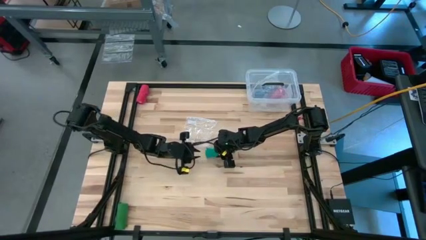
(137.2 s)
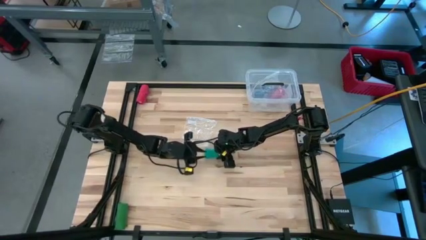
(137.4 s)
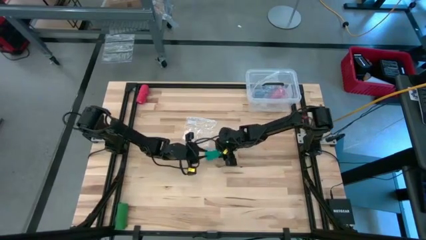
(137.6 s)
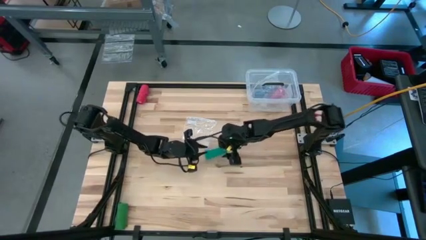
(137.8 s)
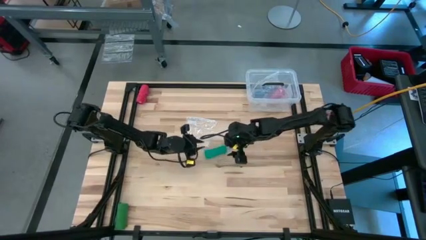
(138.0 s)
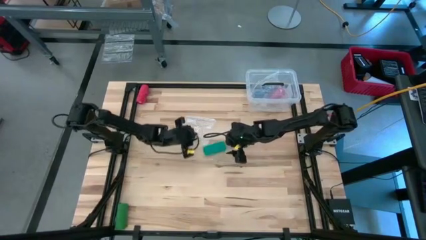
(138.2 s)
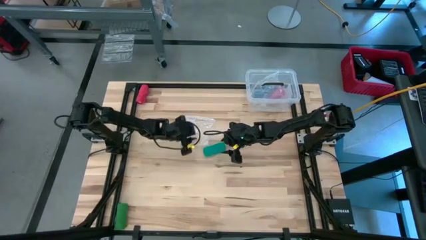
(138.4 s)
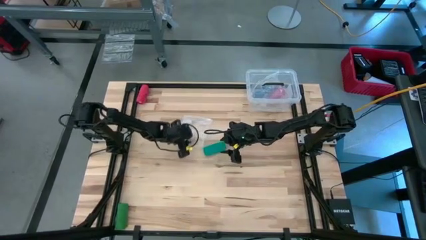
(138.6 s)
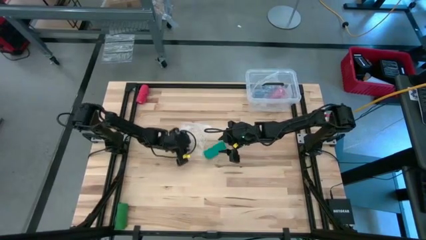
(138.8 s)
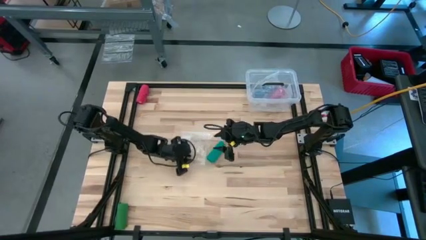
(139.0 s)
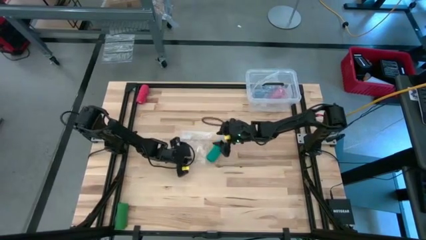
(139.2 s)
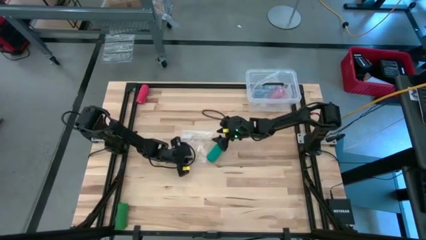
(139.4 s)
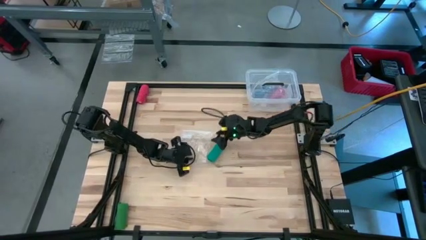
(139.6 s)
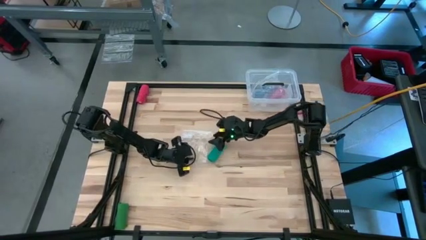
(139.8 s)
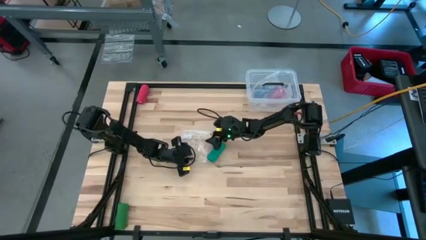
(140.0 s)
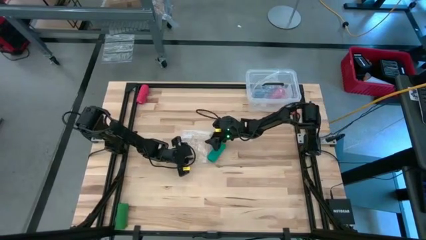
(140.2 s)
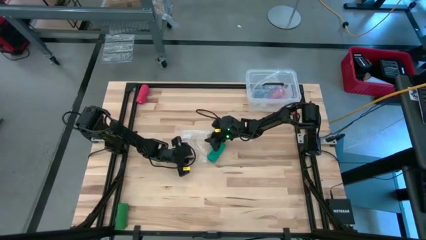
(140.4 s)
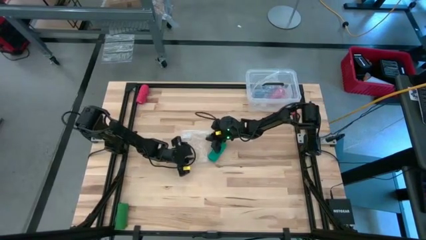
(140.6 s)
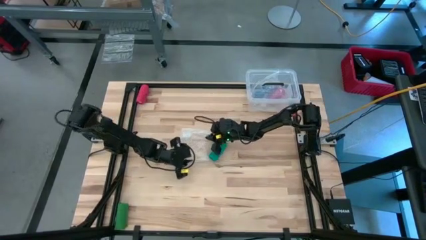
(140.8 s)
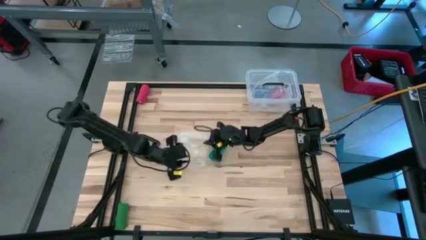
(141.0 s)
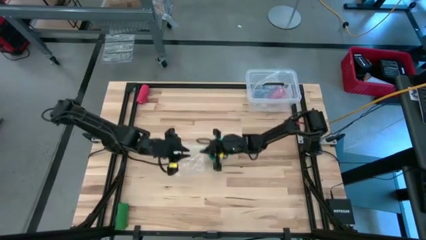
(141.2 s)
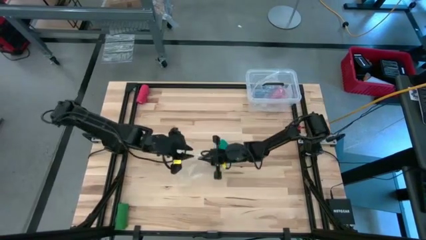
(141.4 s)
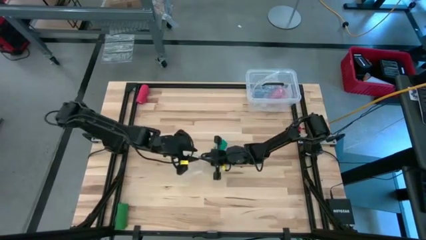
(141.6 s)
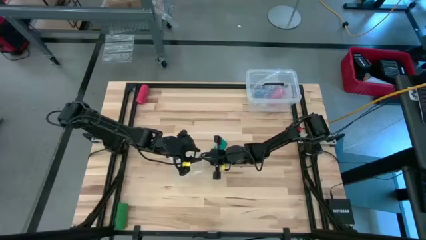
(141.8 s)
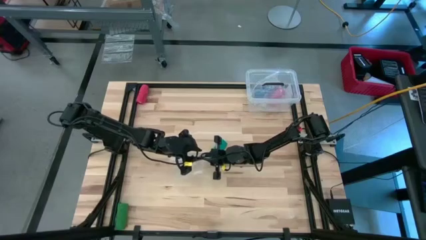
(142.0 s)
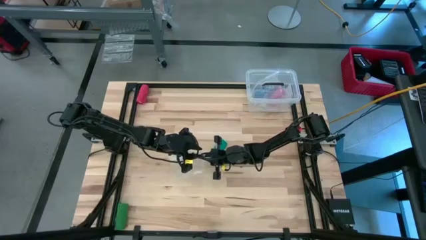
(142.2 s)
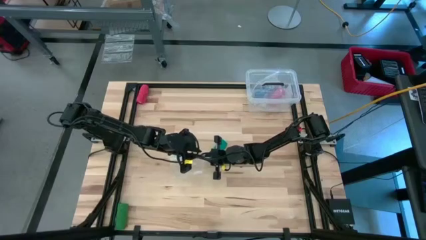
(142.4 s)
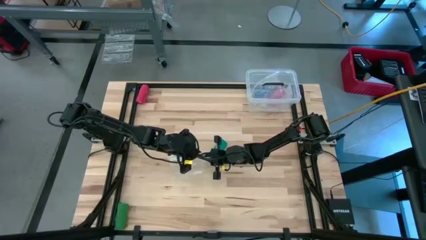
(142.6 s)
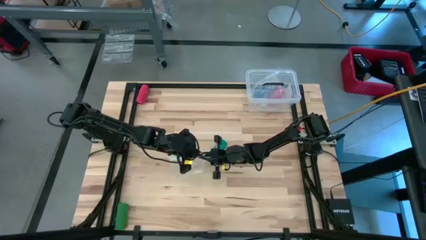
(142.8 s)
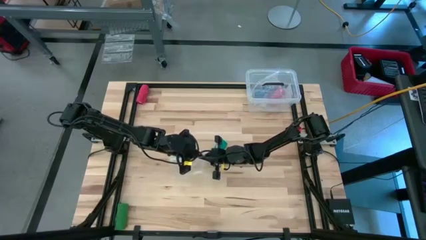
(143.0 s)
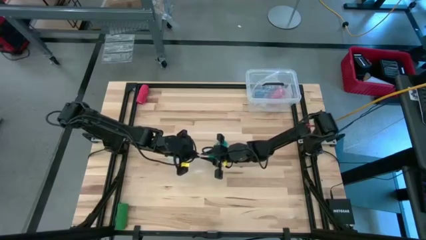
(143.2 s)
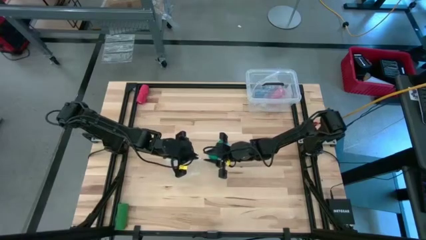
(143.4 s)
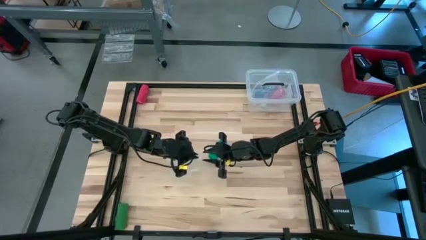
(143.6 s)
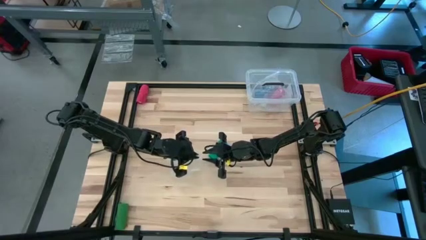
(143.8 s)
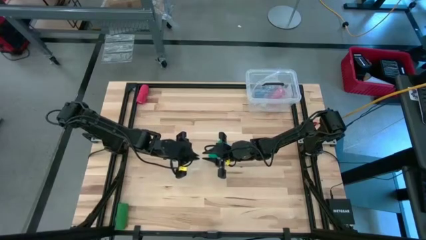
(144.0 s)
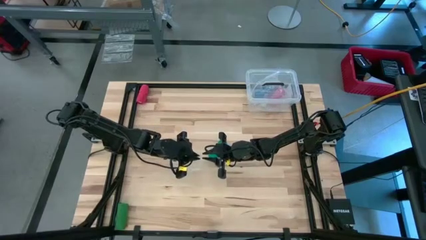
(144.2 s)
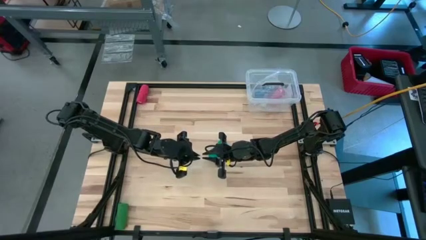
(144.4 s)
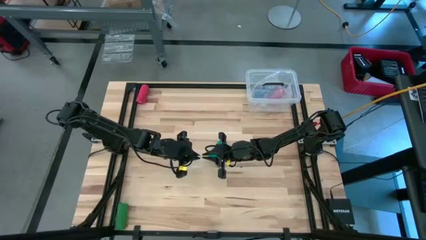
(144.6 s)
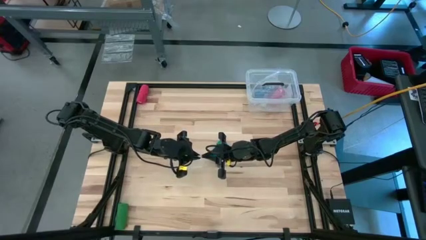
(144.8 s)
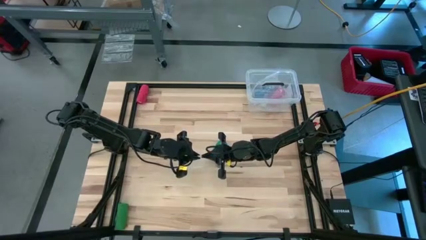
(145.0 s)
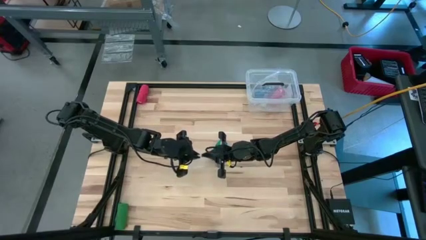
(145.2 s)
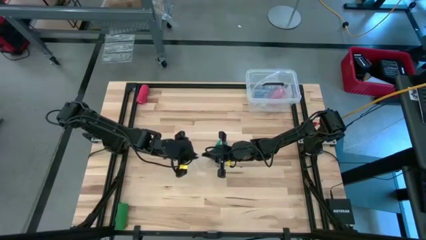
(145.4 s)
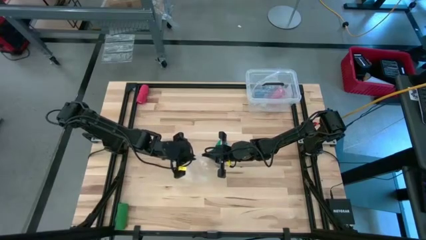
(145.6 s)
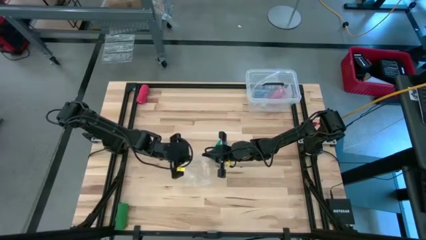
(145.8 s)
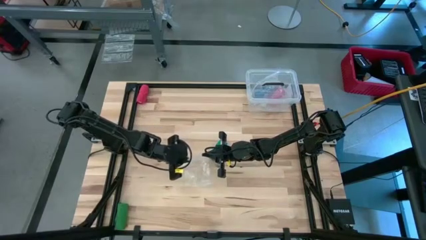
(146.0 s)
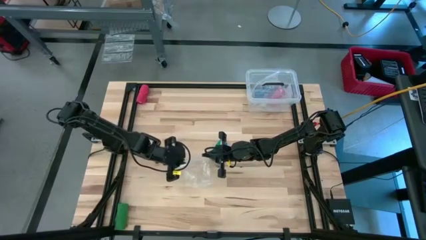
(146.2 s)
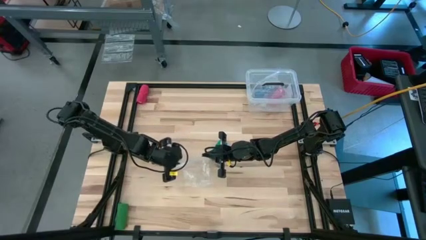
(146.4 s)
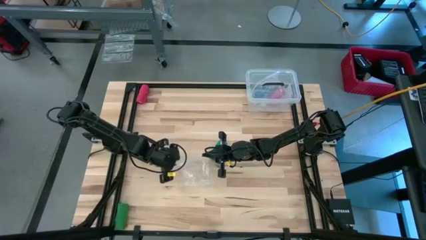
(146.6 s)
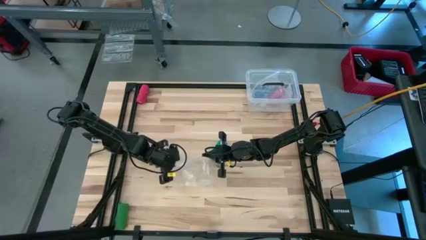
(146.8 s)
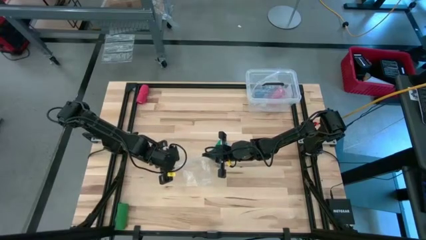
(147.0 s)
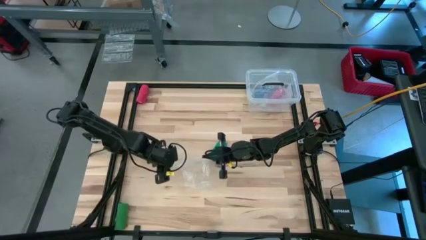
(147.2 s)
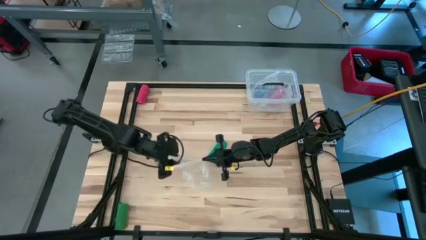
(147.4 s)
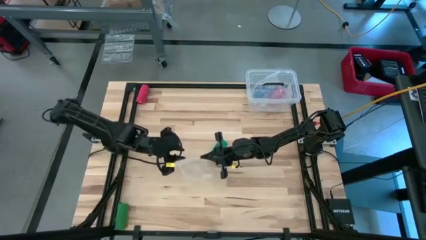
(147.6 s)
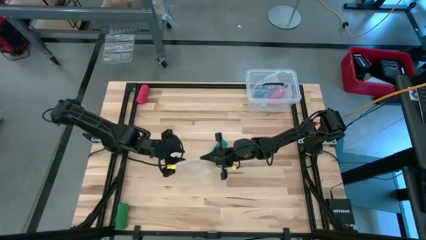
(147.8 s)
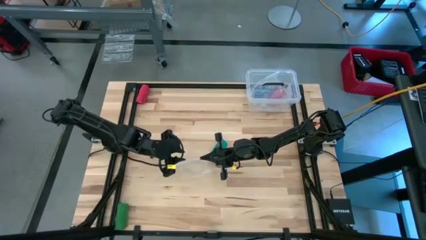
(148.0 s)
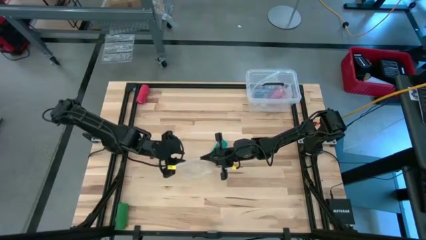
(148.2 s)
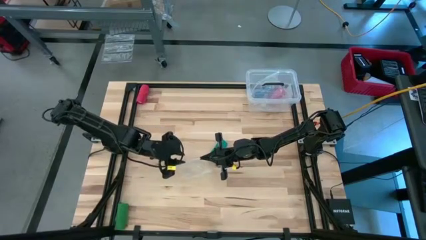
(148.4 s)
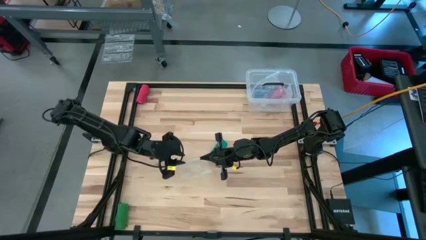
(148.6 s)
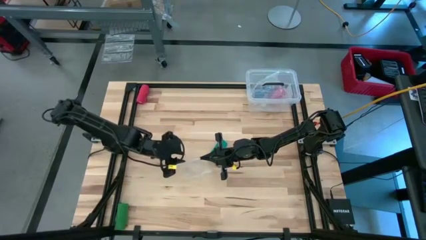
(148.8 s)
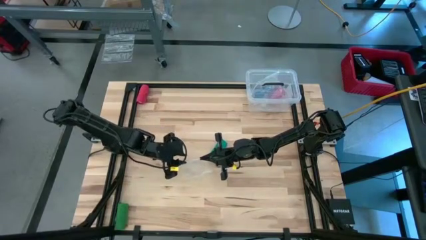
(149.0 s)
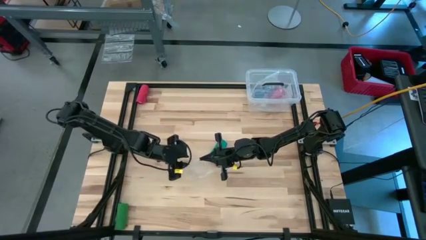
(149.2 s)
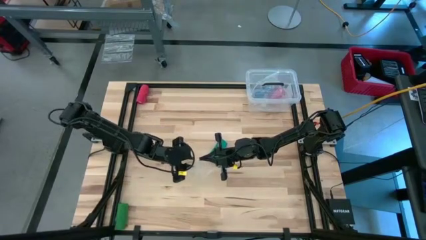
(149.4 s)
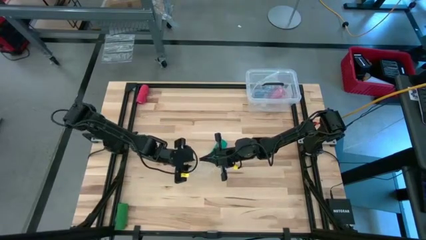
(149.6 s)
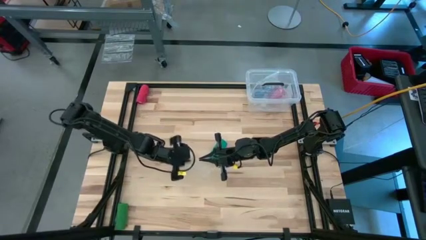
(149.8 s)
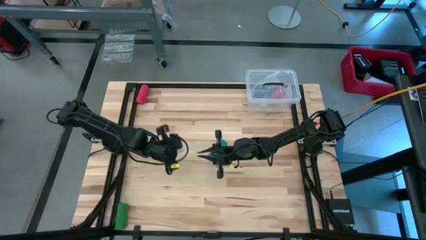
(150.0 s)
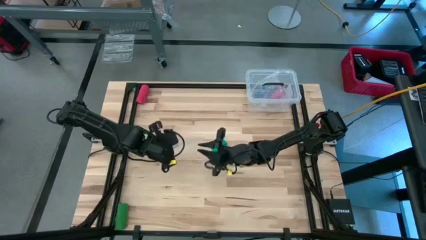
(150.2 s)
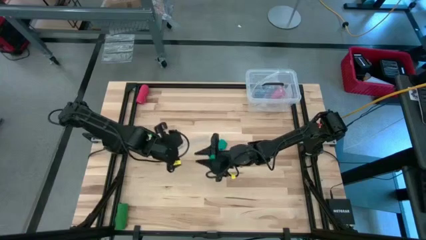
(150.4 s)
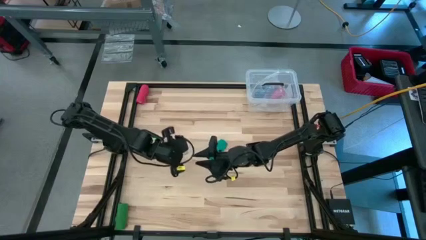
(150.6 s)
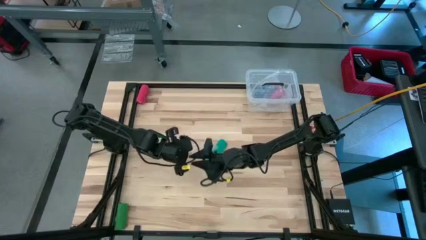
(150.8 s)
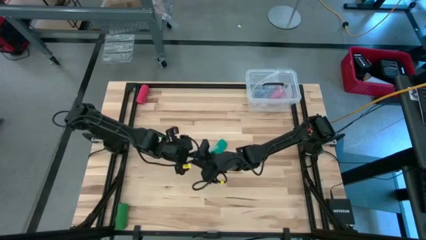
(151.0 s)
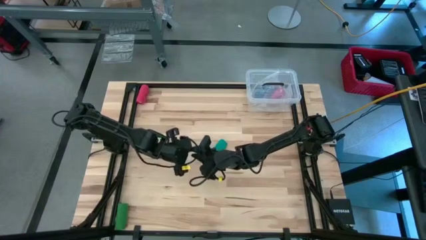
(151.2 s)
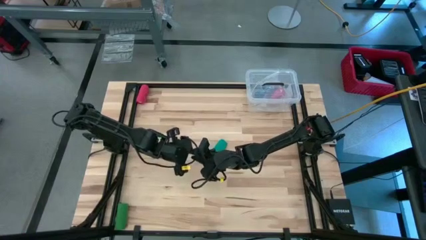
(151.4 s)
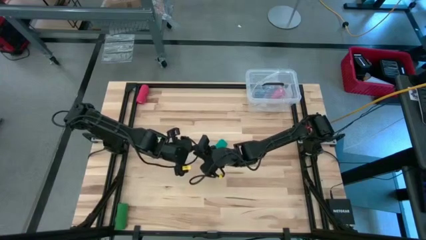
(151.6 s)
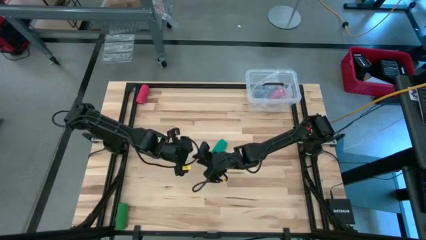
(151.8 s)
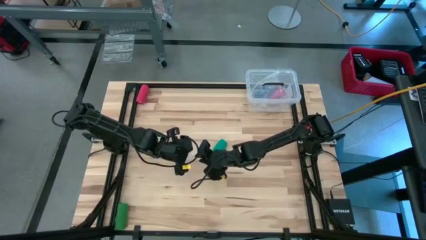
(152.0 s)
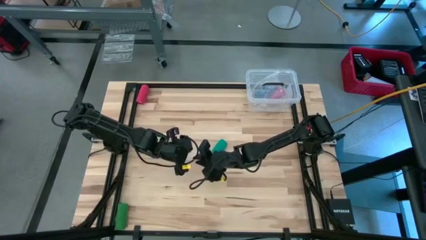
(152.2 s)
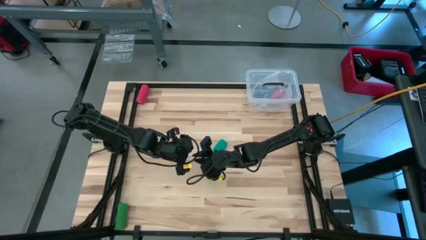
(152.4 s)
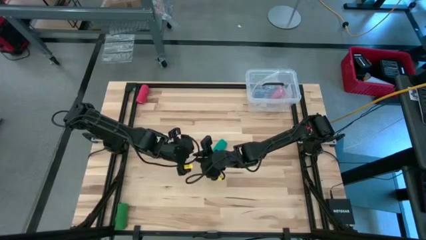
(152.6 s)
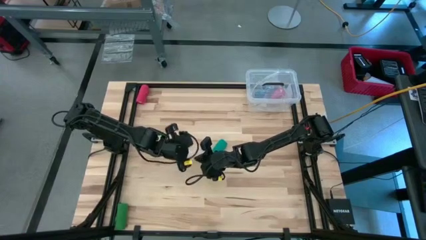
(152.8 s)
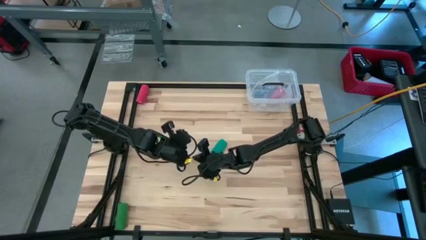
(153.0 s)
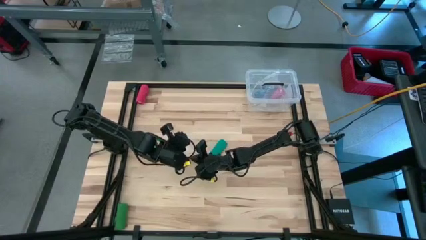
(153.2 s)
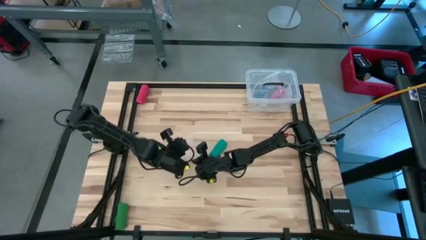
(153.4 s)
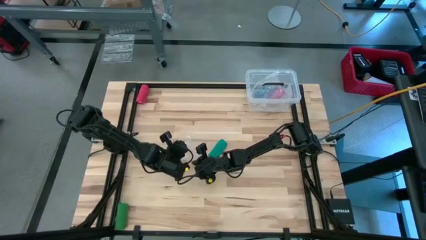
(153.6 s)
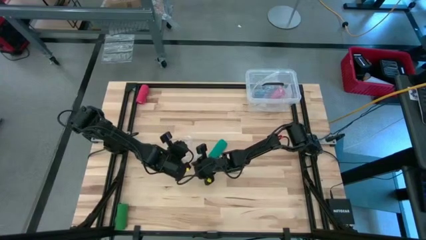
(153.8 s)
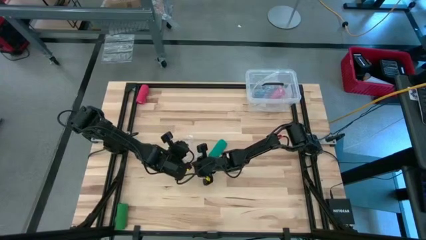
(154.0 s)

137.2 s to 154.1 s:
Task: Roll bandage
Open the transparent zip bag
